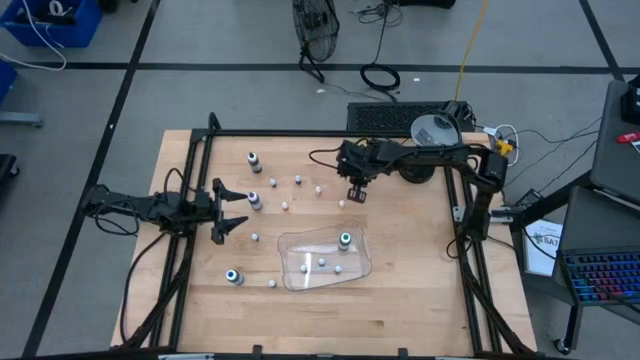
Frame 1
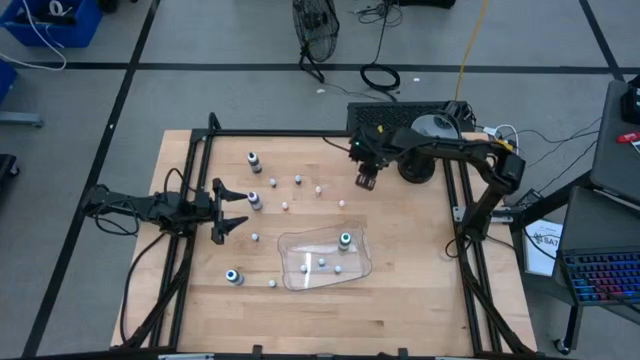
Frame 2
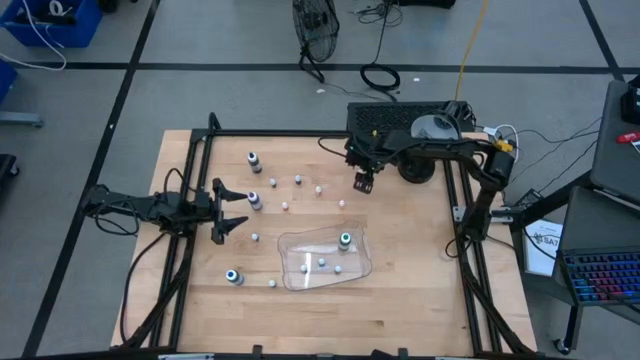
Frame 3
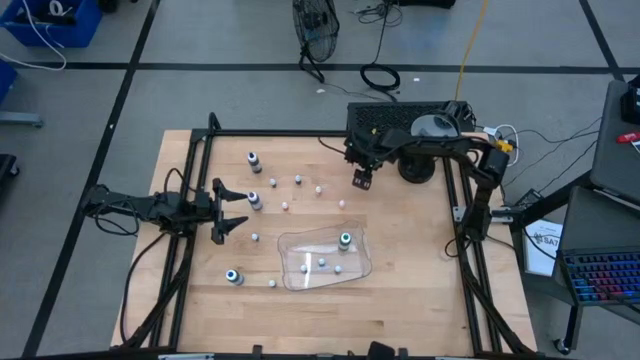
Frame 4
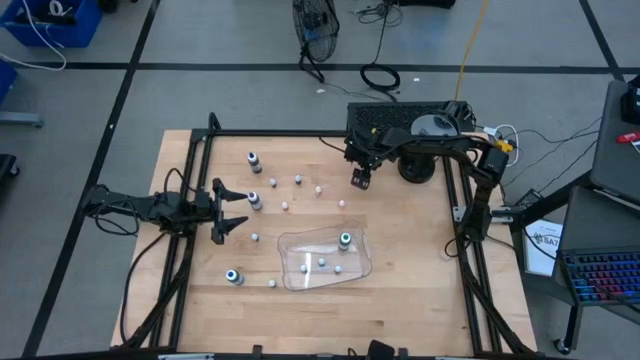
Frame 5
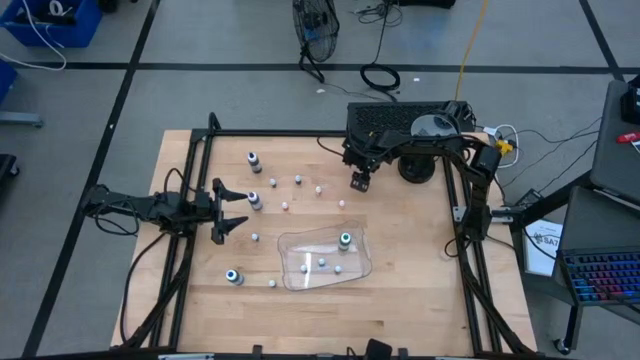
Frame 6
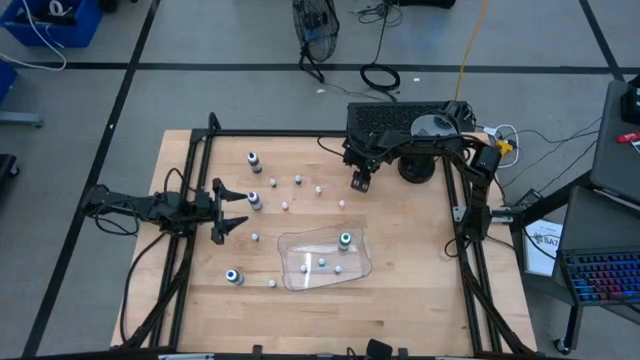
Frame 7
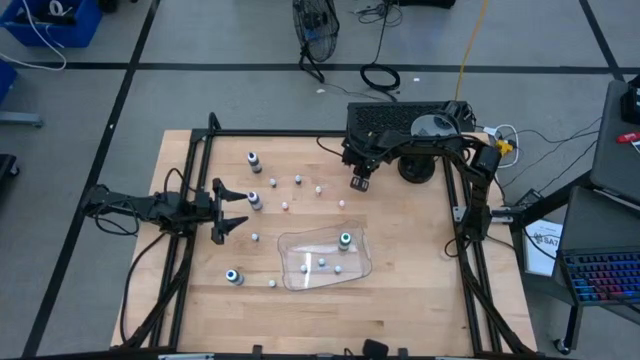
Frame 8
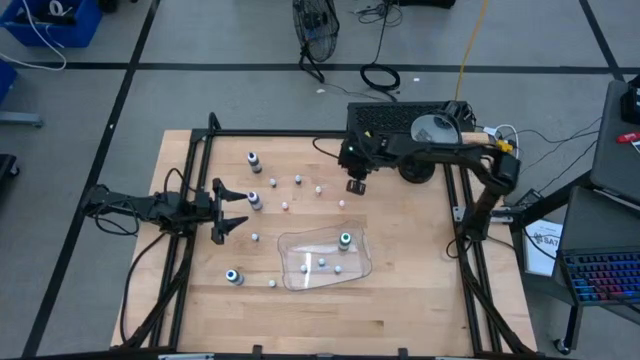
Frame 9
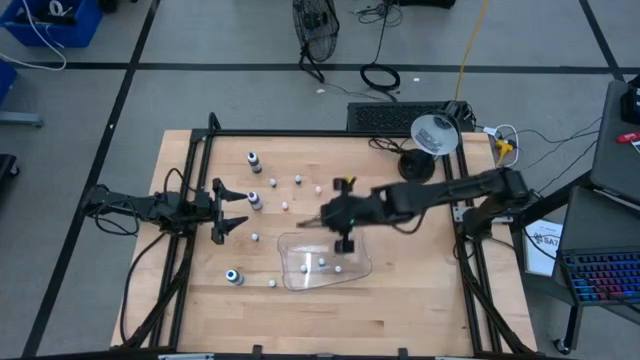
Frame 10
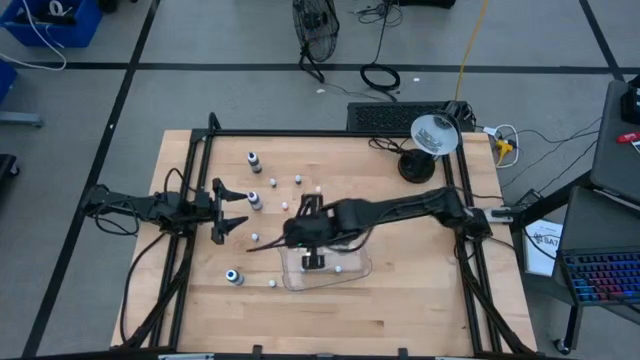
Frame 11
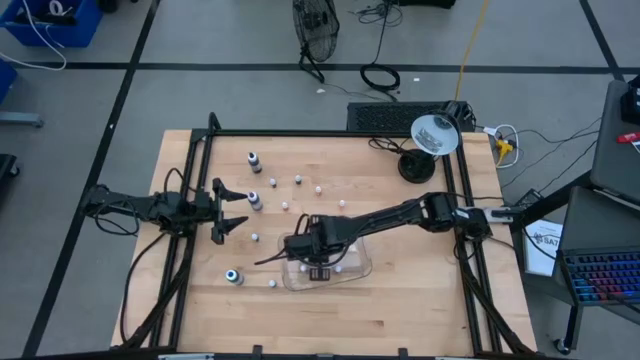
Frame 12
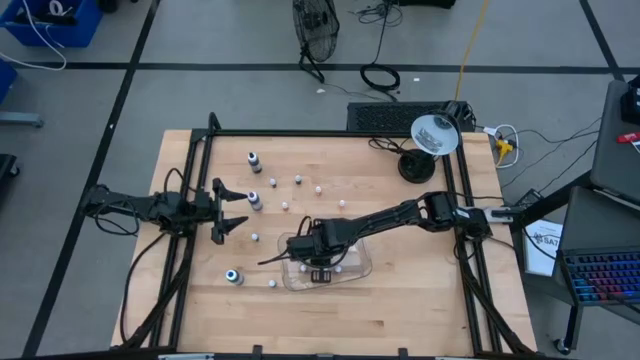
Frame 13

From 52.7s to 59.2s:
Task: Pick & Place food coloring
Put the small orange food coloring bottle into the bin

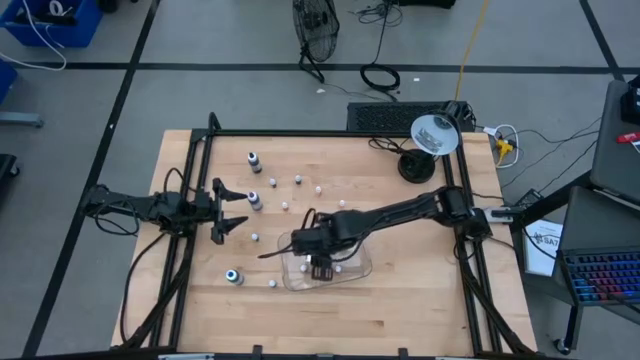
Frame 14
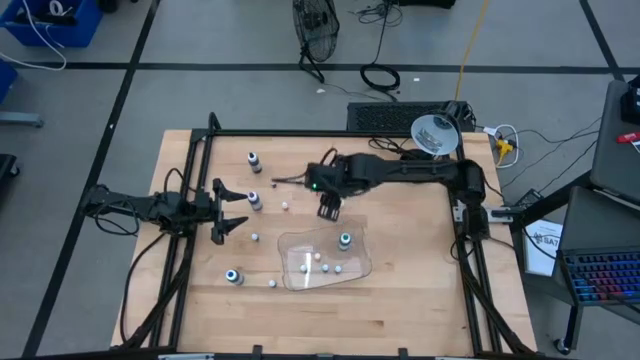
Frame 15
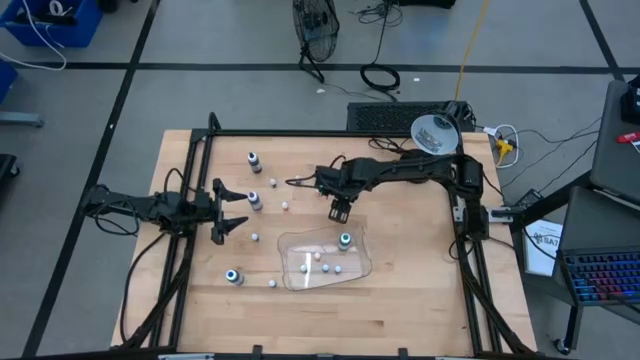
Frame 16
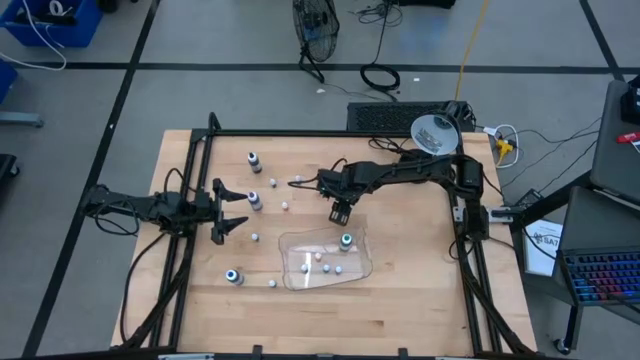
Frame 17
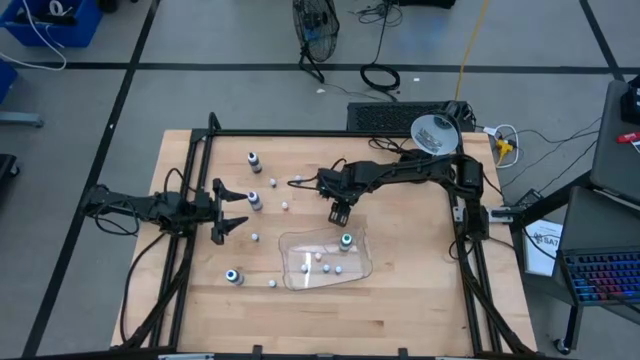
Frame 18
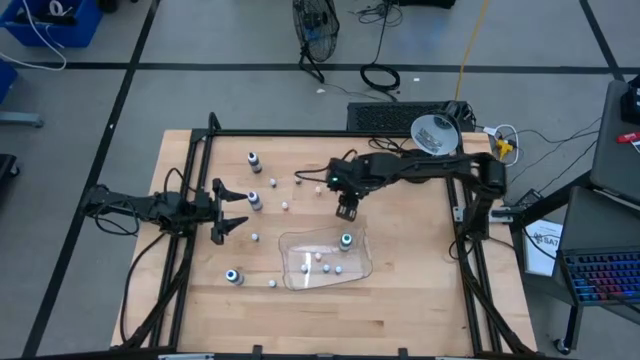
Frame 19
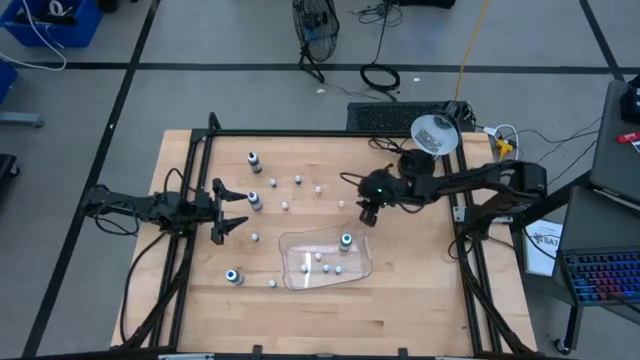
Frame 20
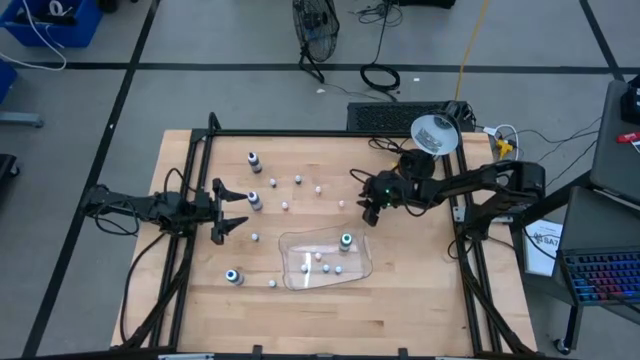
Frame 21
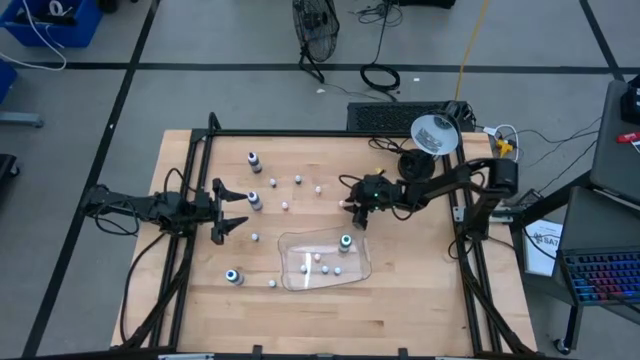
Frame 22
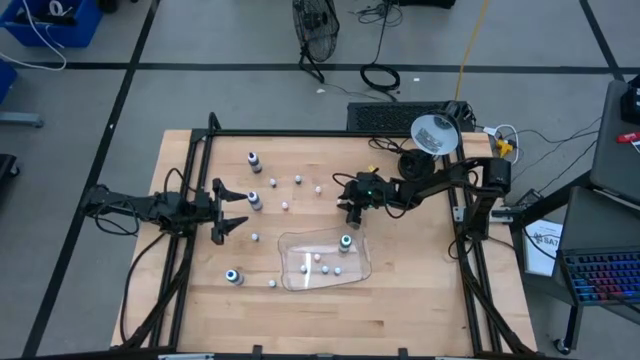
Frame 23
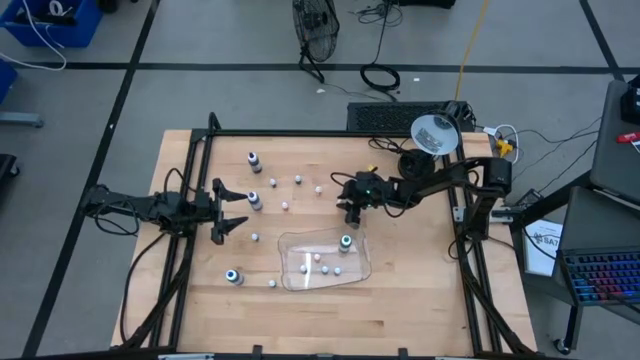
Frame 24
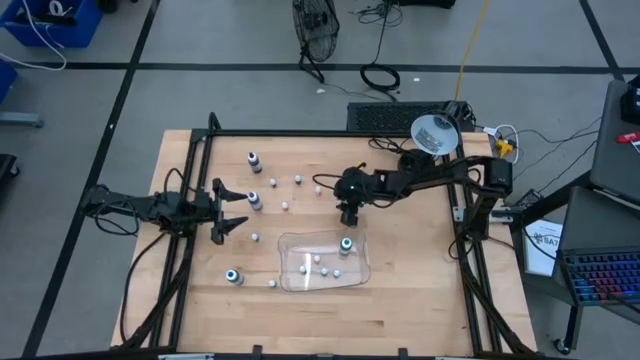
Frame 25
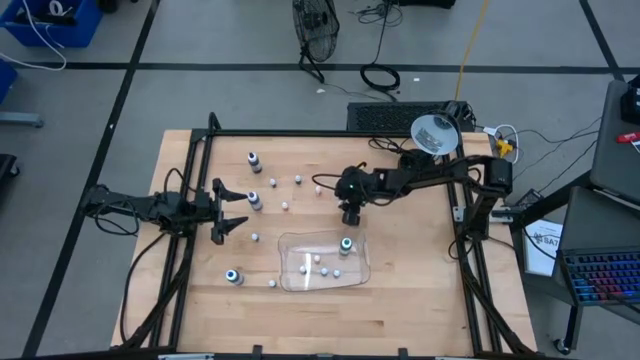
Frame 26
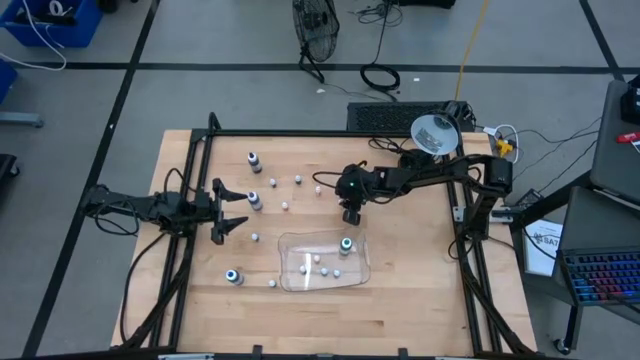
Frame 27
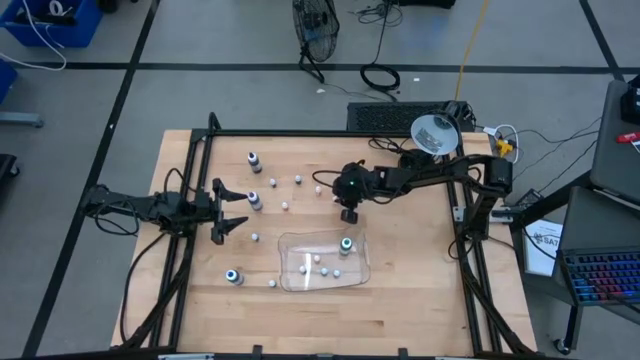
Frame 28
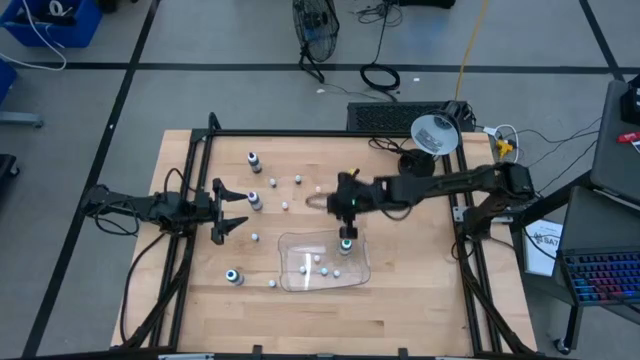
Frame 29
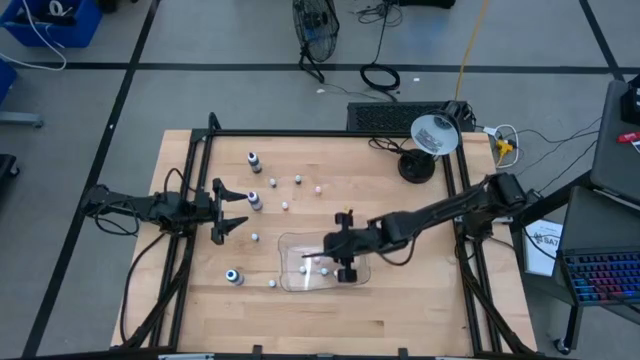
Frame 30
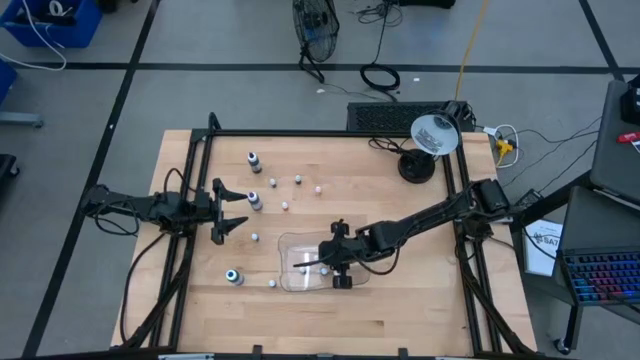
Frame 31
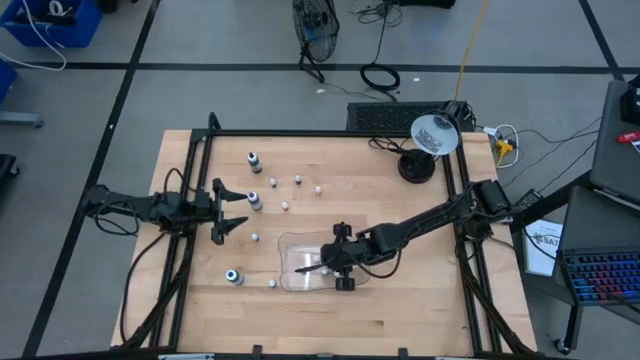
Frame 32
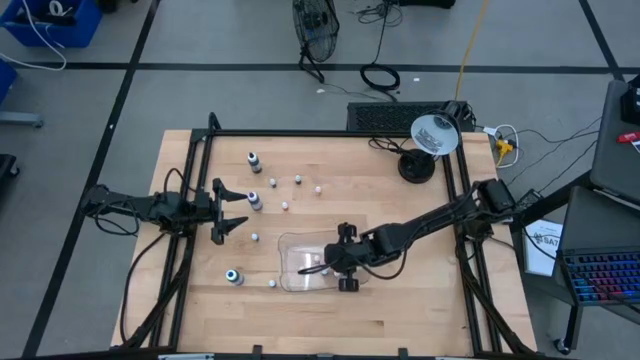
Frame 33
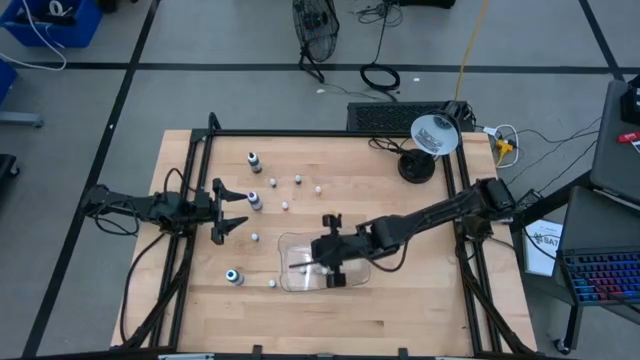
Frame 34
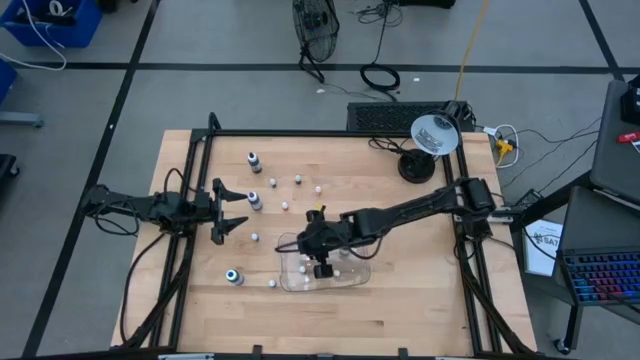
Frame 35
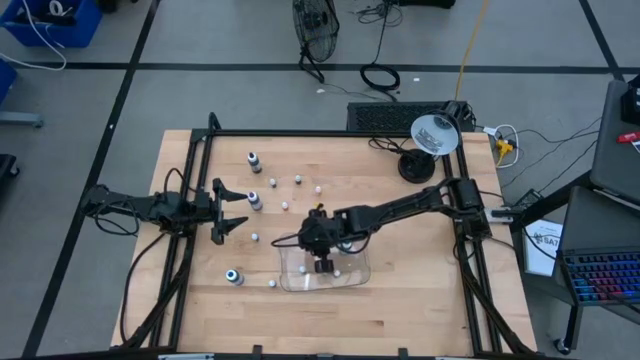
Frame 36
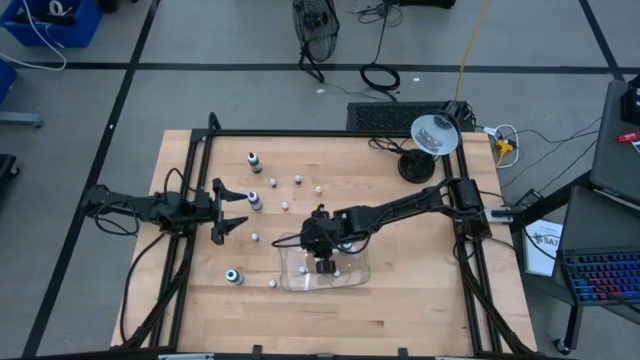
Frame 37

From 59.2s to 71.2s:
Put the bottom right small orange food coloring bottle into the bin

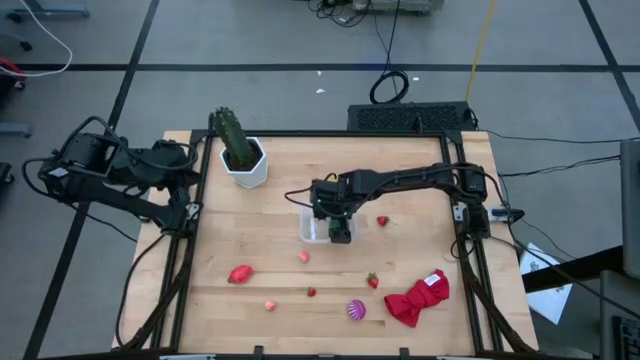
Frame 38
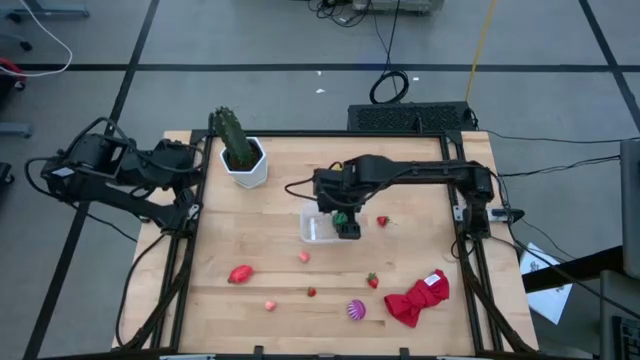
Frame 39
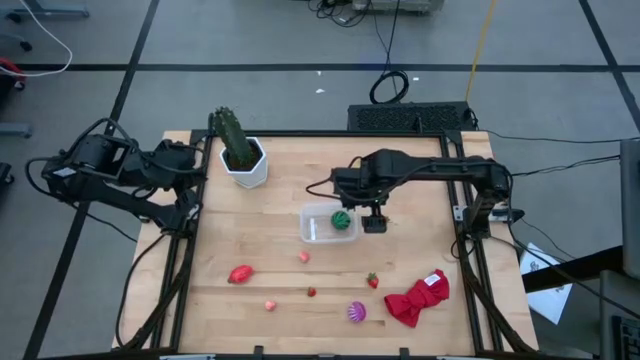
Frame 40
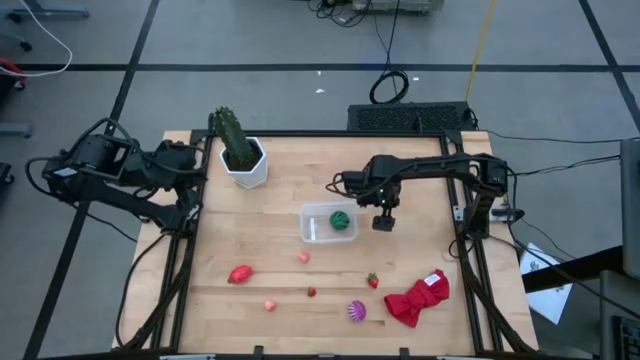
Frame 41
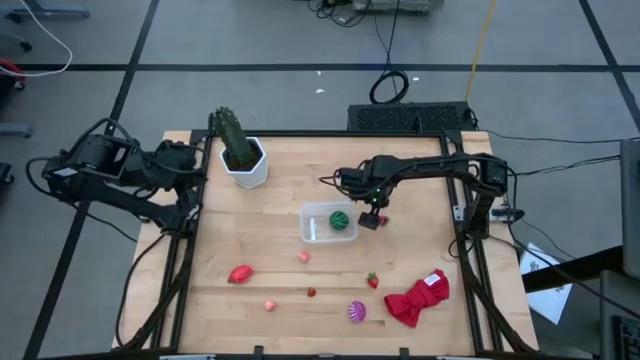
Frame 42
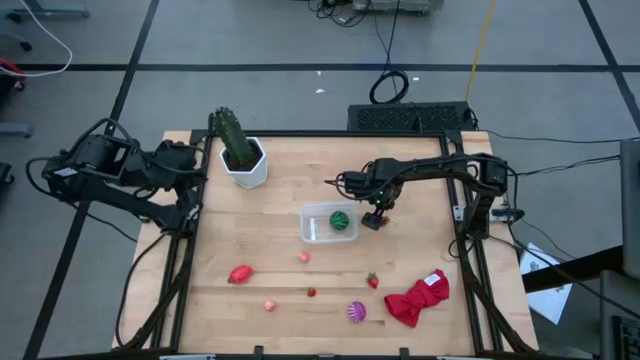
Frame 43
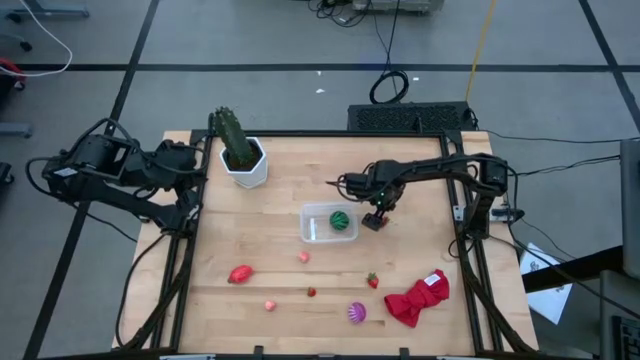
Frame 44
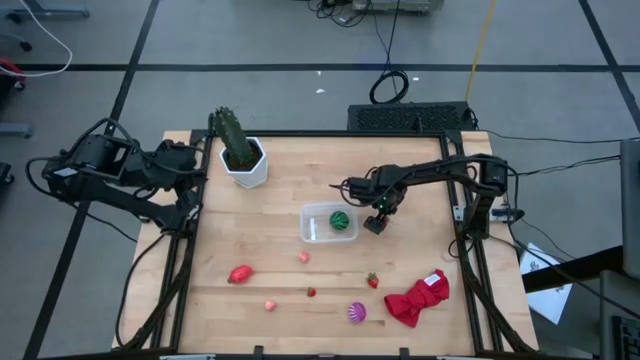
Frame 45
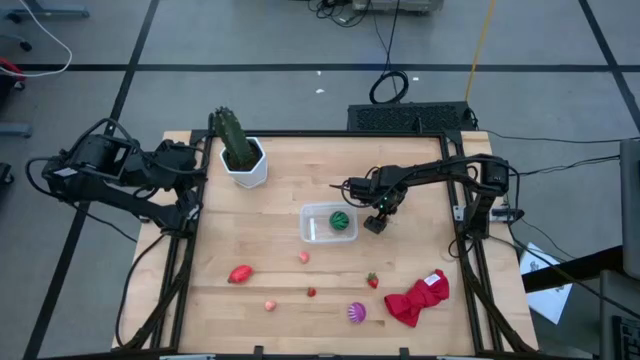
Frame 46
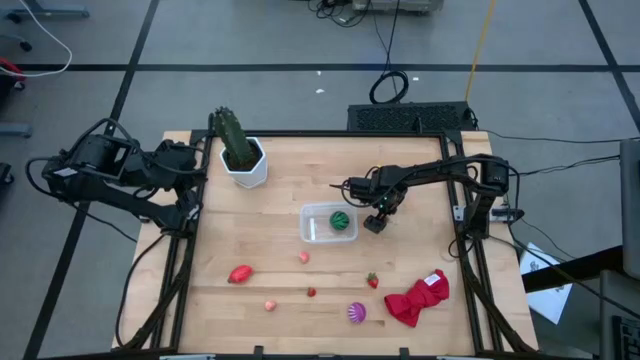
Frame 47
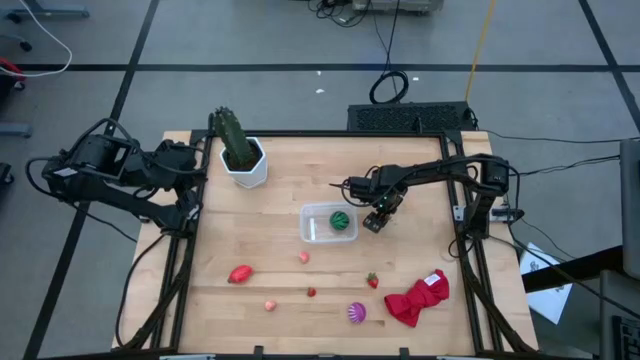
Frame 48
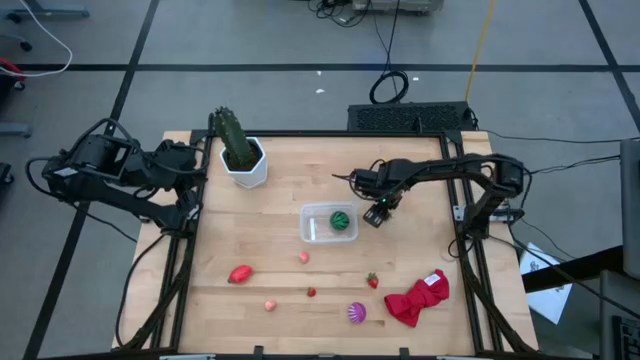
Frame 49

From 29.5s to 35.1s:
Task: Pick and placing Produce into tupperware
Put the top strawberry into the transparent bin
